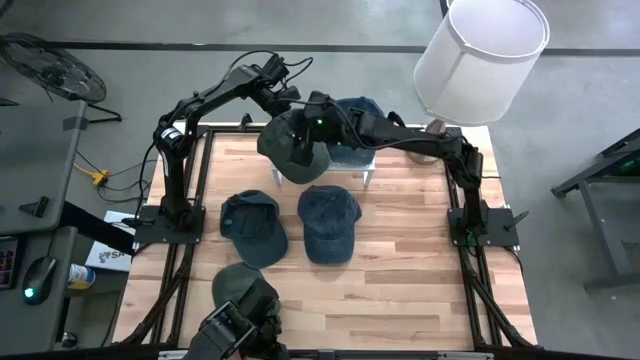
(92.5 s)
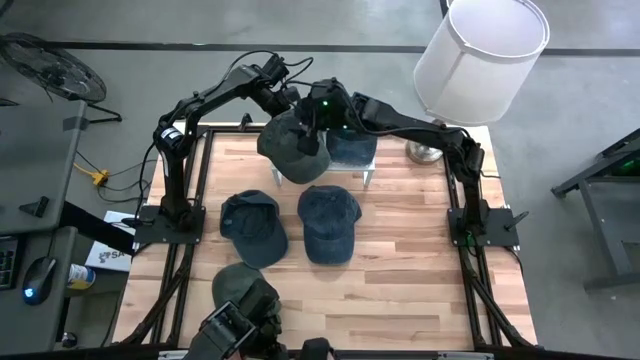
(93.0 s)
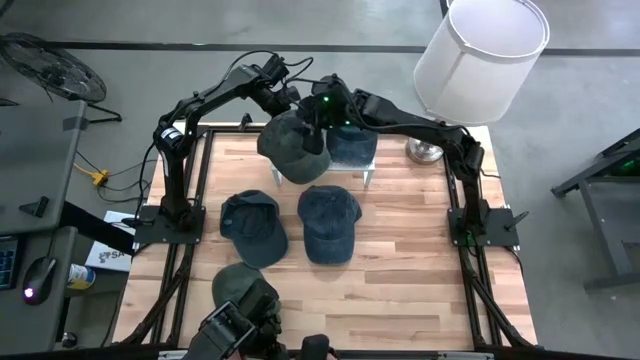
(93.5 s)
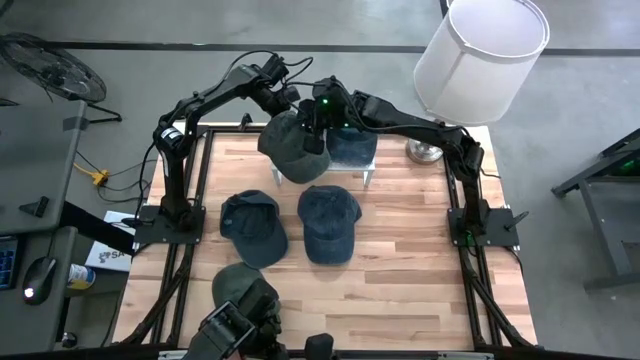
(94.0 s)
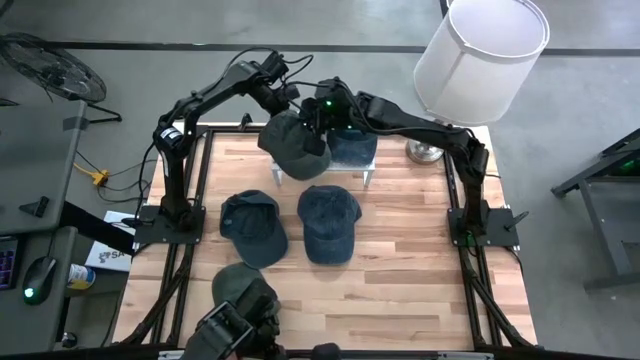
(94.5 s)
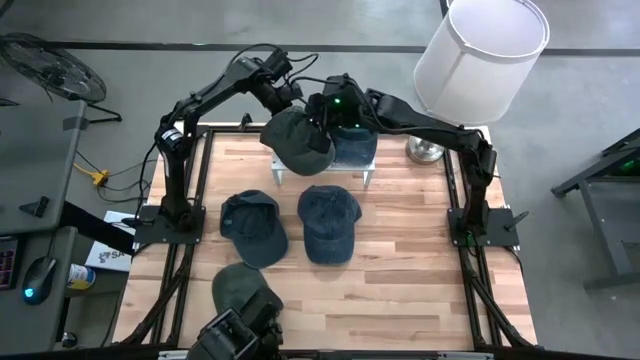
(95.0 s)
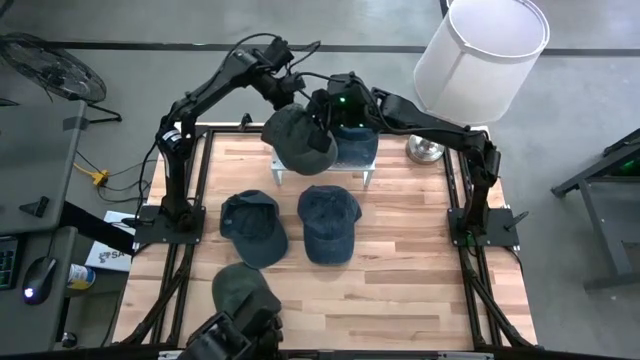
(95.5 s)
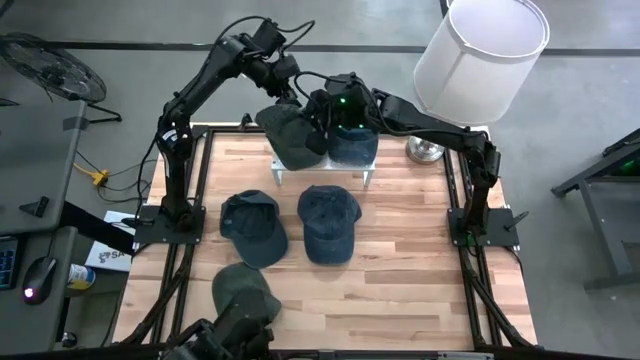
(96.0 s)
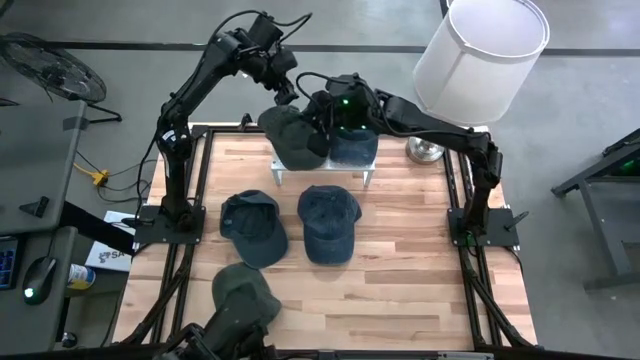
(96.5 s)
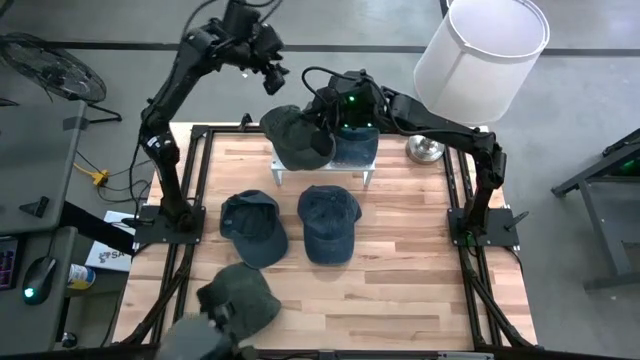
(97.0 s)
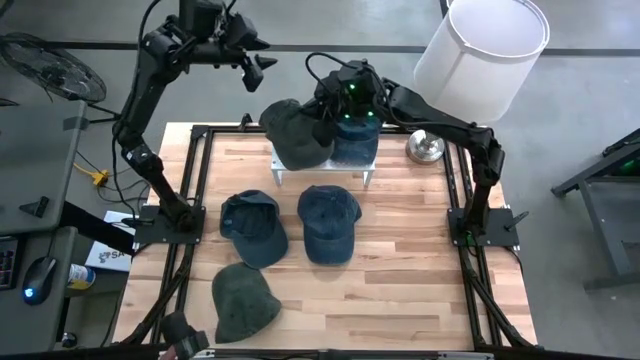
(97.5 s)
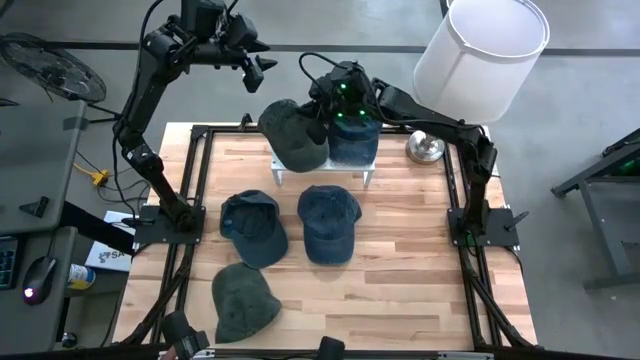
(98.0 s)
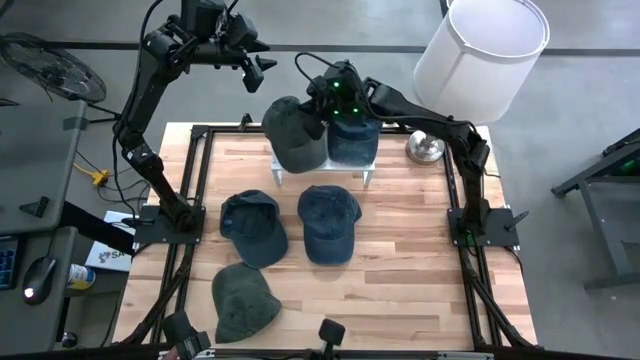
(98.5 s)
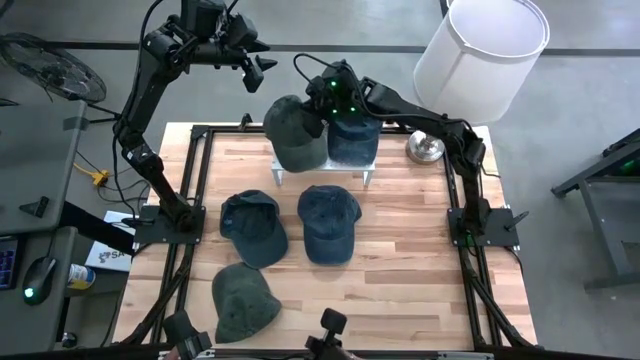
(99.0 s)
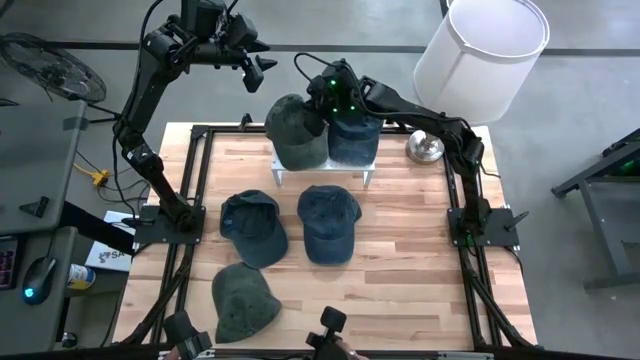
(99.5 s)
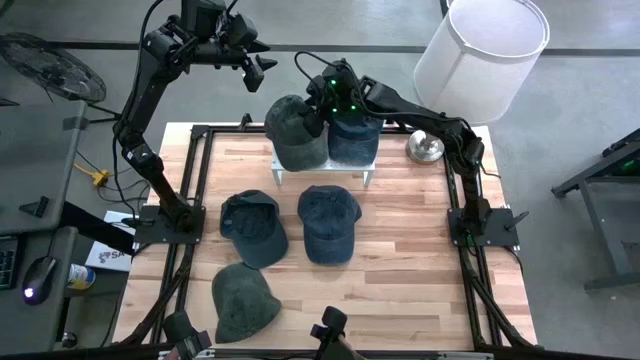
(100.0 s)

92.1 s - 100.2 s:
Task: Pick & Place hat
Stack the right gray cap on top of the gray cap on the shelf

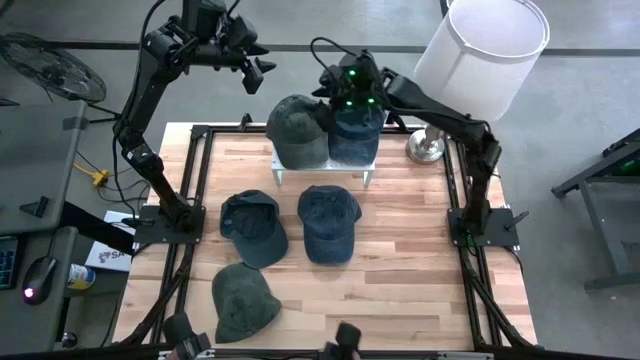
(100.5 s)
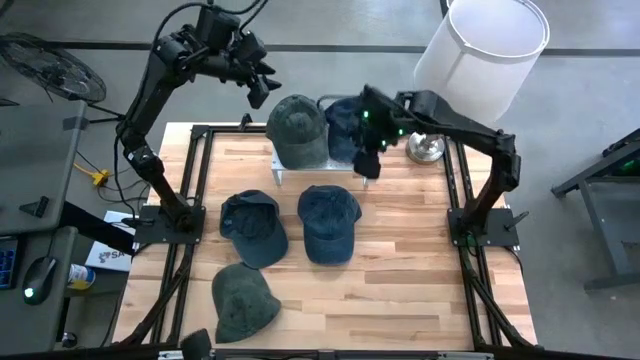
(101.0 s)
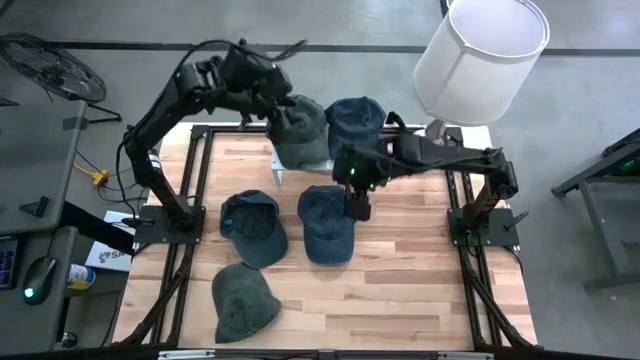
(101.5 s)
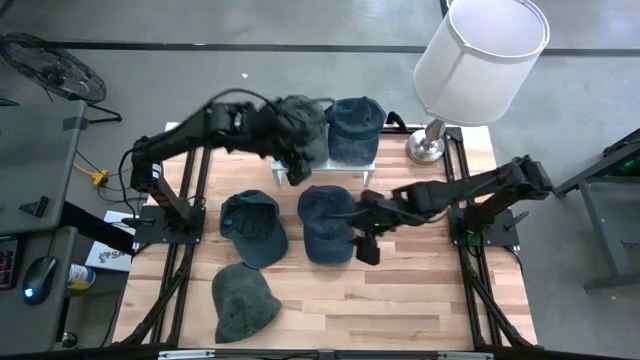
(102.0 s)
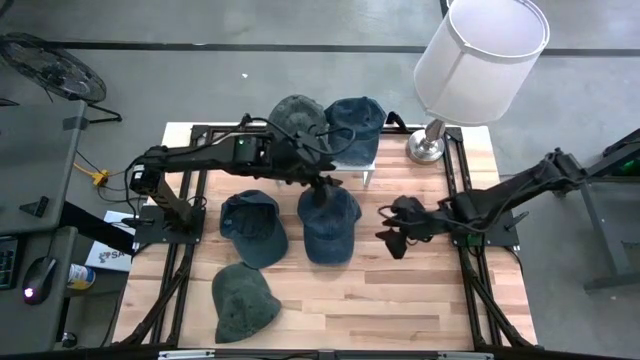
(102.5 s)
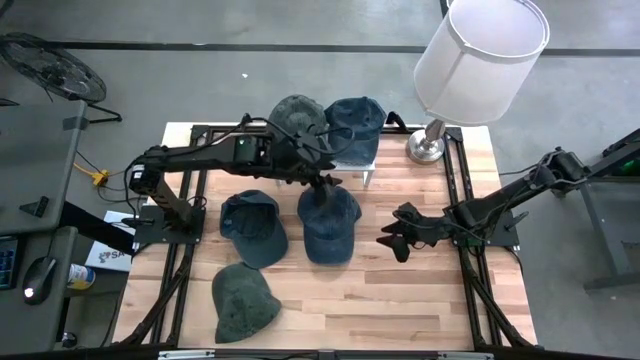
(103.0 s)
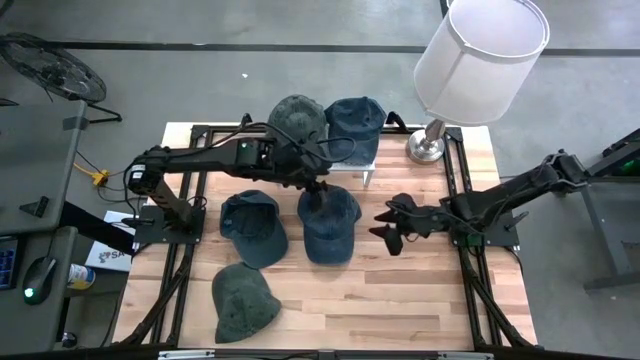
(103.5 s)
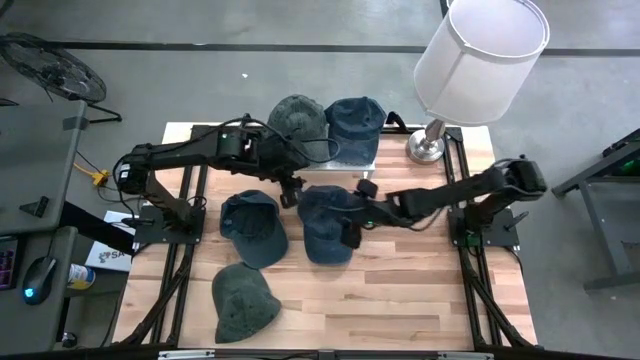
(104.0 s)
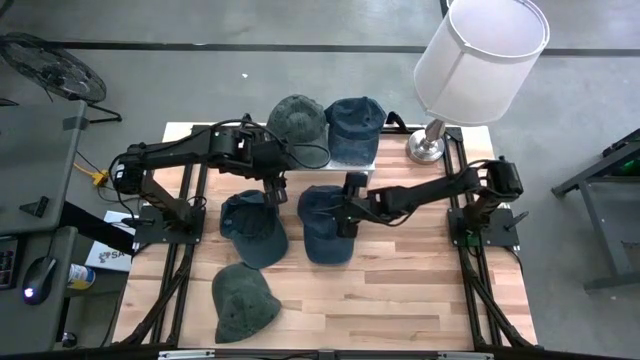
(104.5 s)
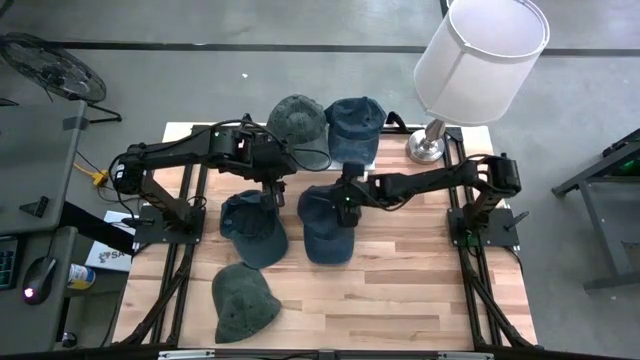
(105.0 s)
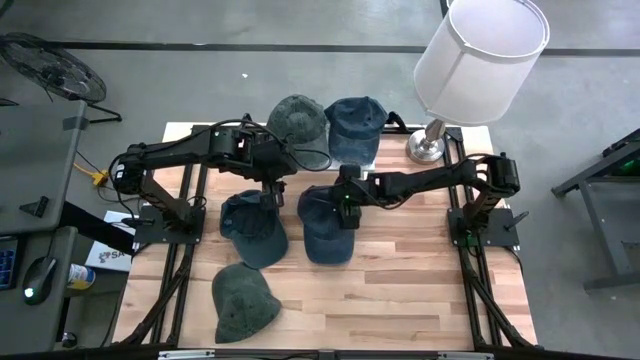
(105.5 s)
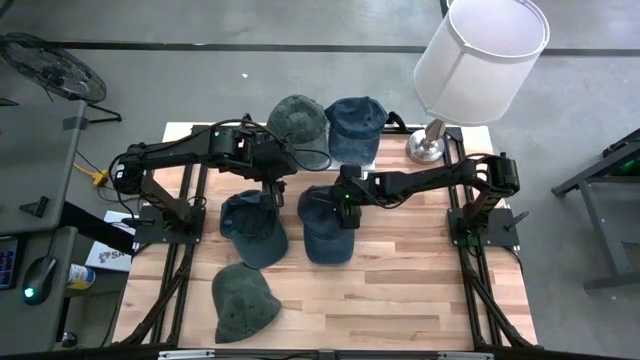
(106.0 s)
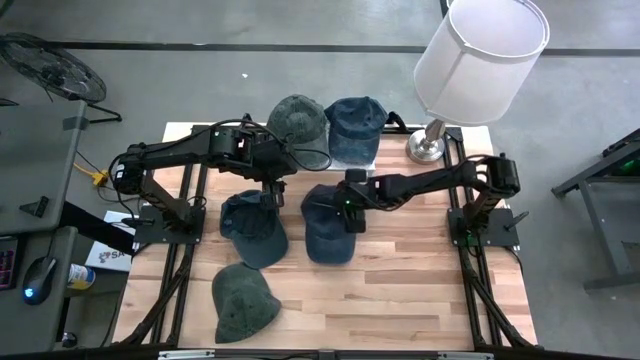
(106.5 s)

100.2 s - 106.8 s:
Stack the right blue cap on top of the blue cap on the shelf

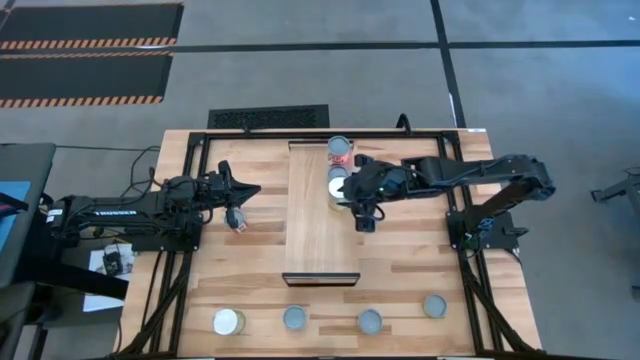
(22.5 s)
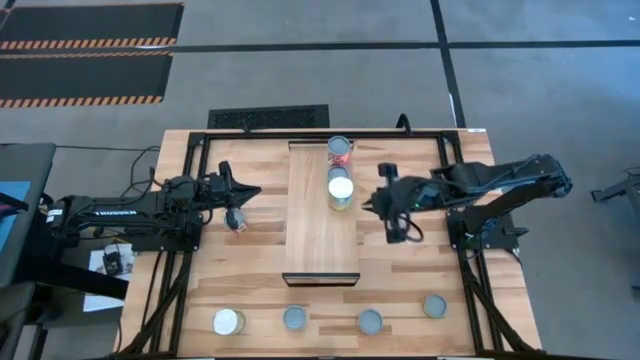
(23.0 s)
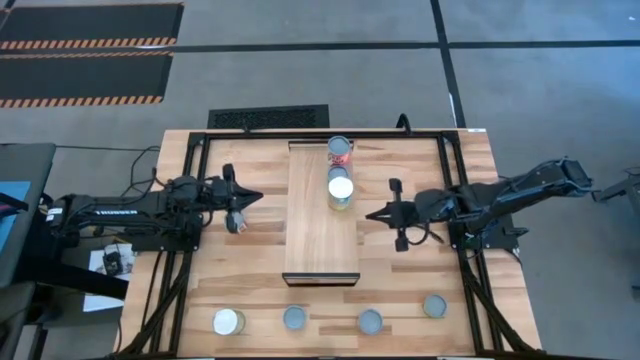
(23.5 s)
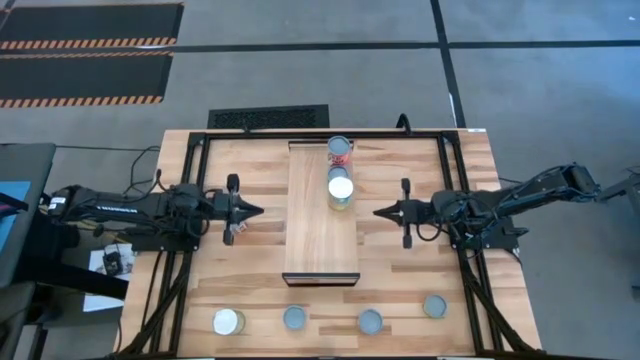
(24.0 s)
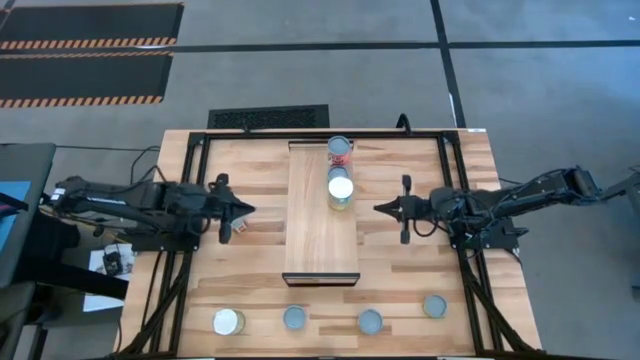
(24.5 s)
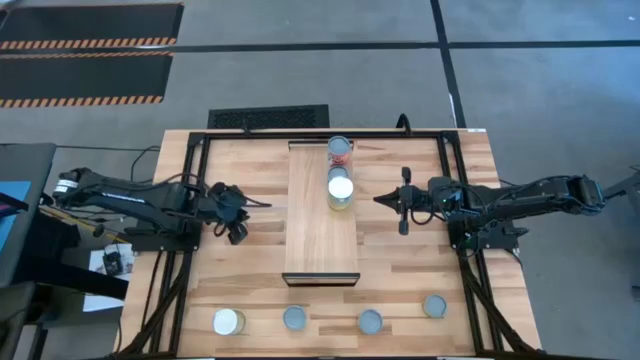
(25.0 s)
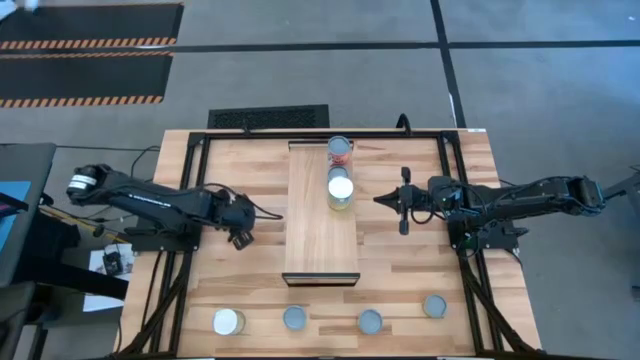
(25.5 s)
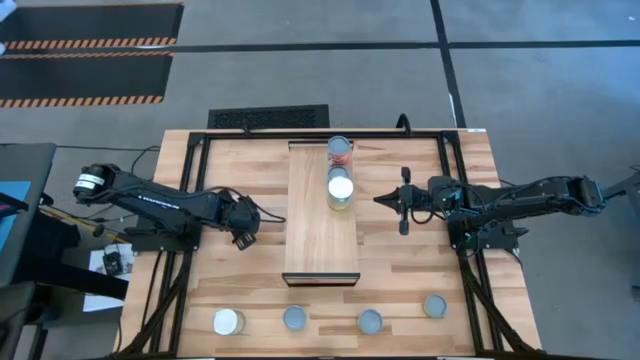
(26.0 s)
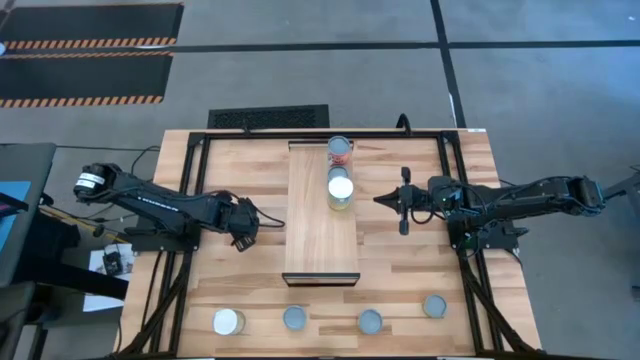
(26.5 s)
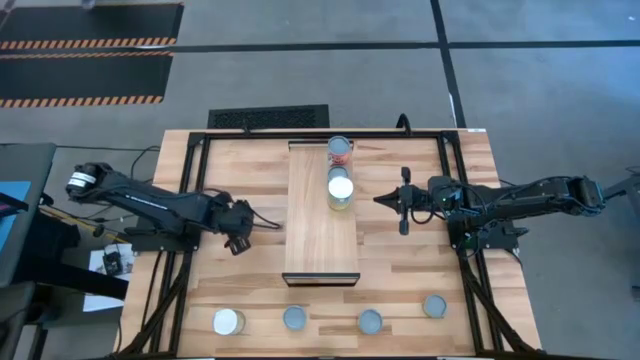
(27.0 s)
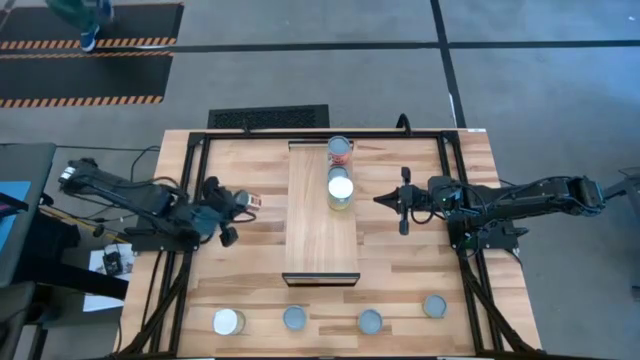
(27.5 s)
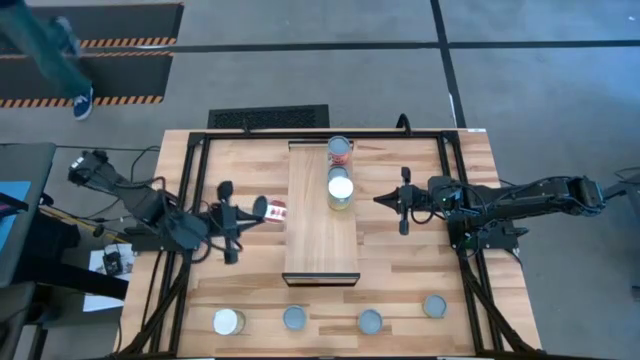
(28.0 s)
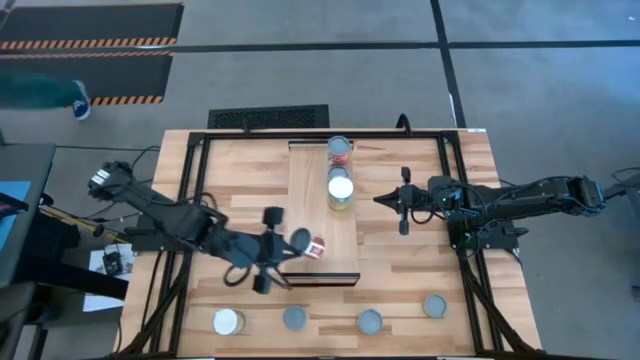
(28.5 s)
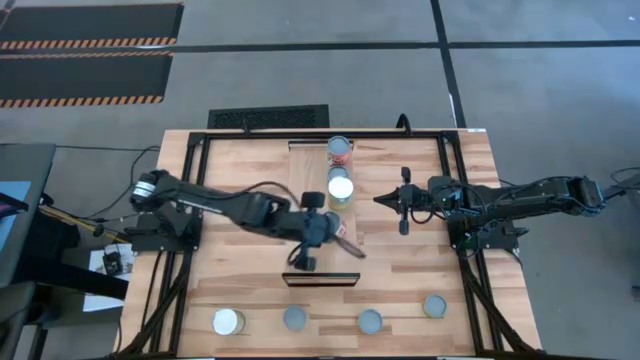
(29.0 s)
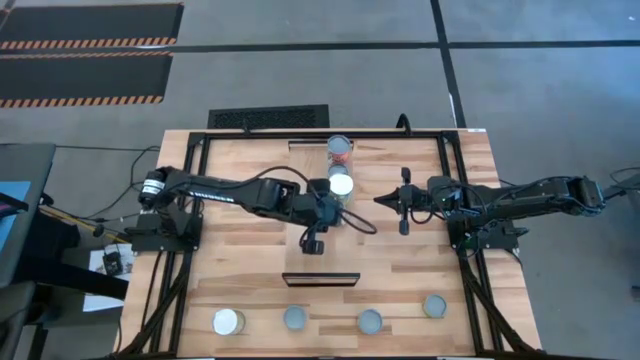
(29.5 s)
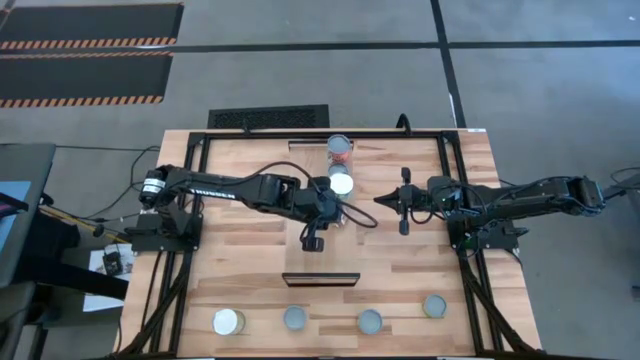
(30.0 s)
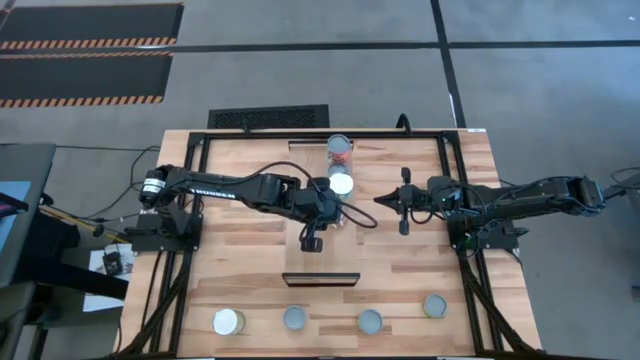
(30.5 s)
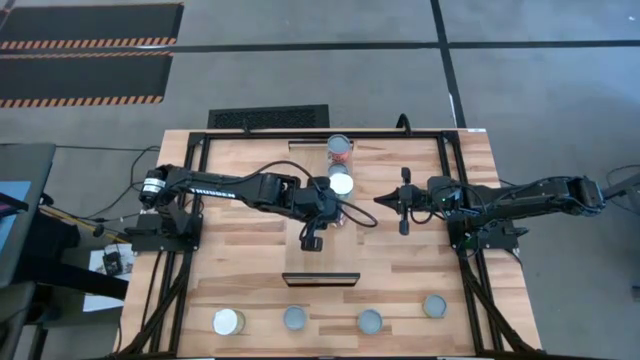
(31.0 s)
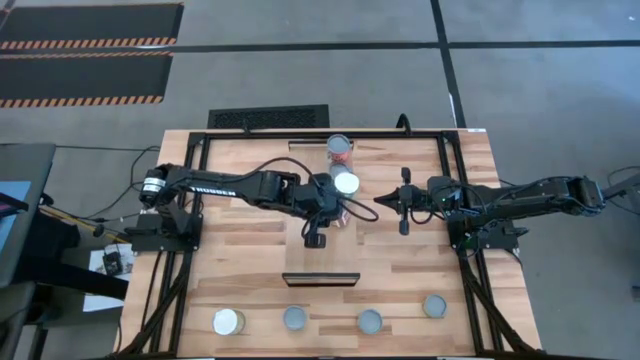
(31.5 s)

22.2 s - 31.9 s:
Task: Pick and place cans onto a shelf
Put the small red can on the shelf
